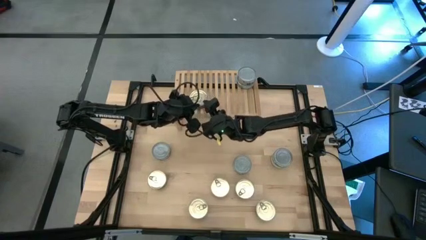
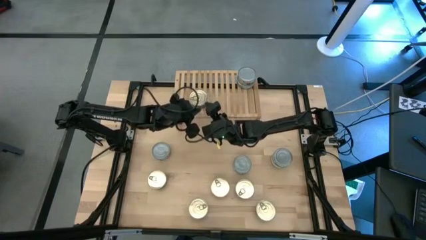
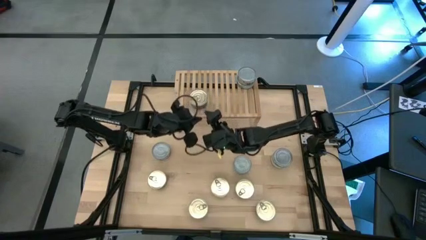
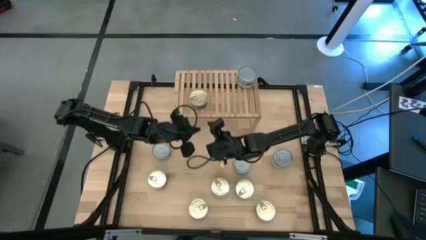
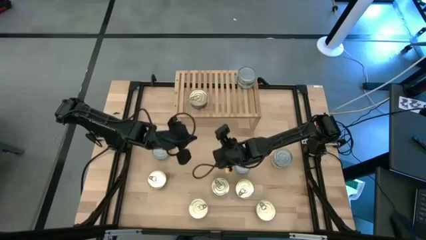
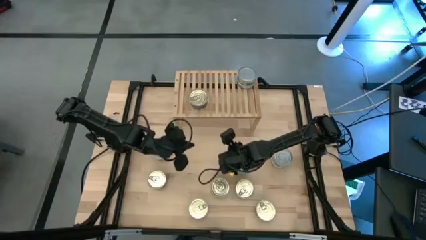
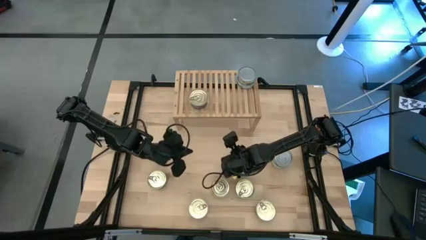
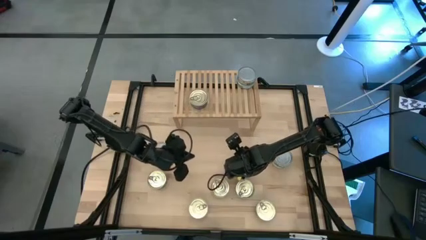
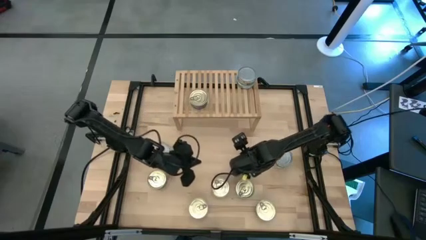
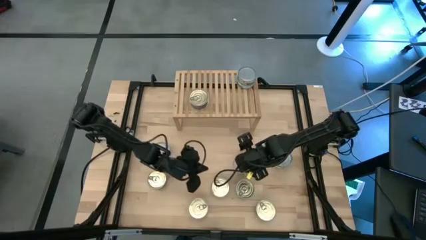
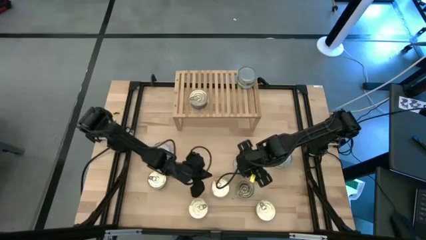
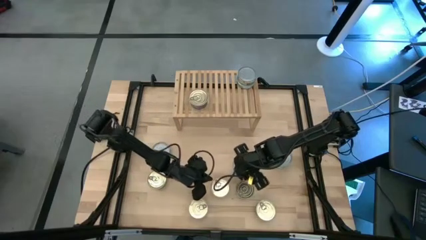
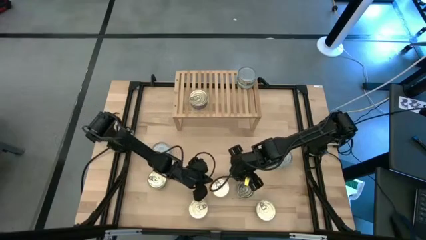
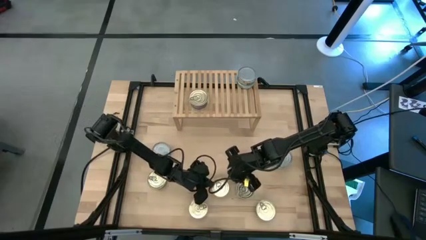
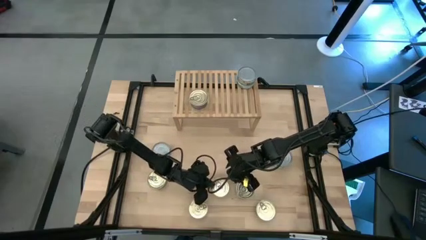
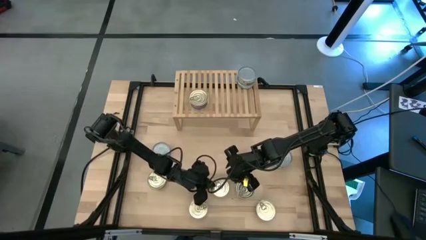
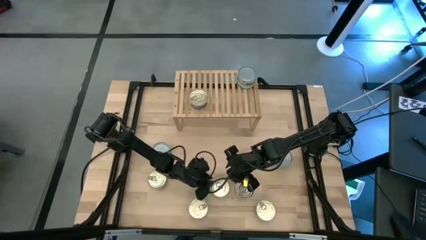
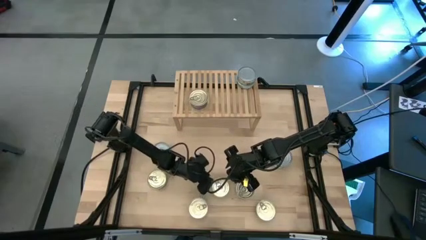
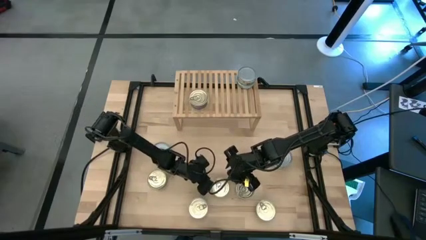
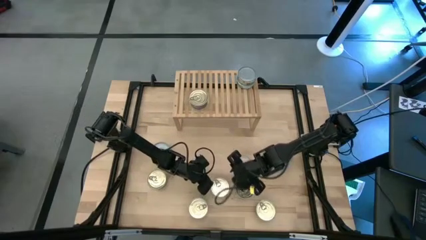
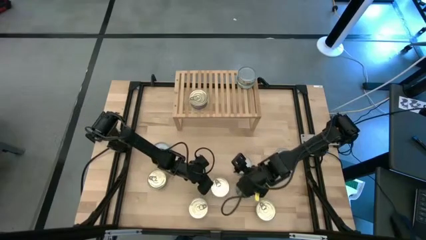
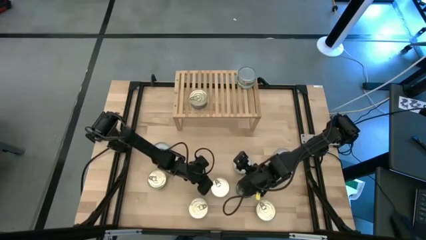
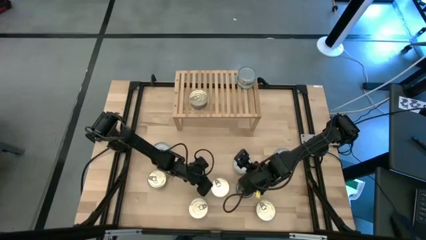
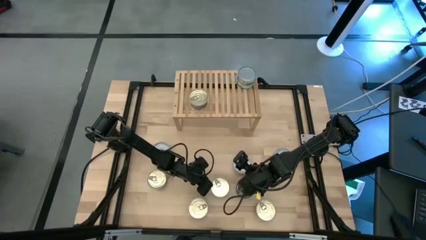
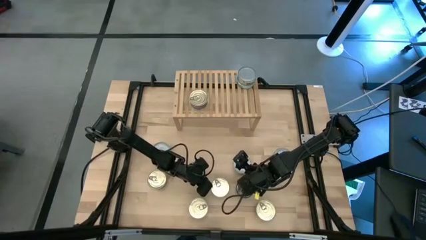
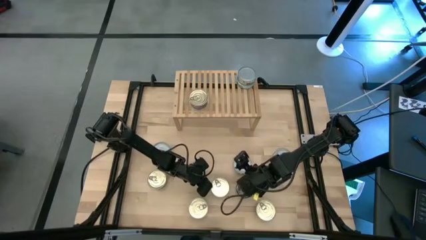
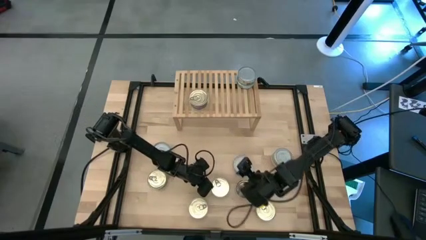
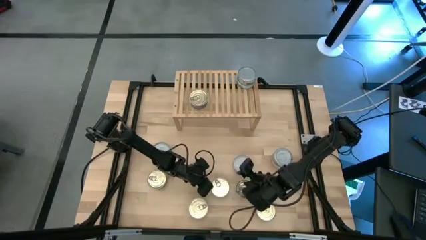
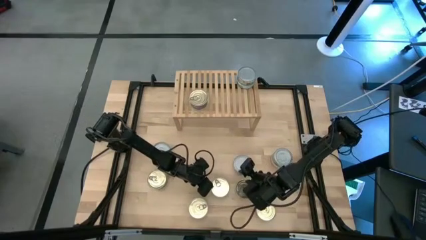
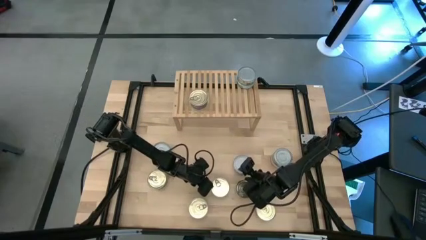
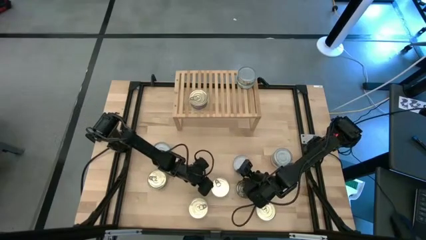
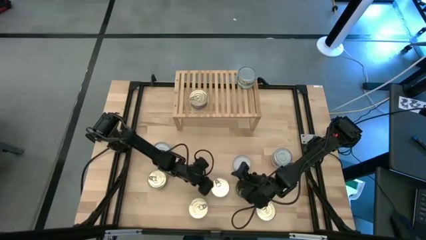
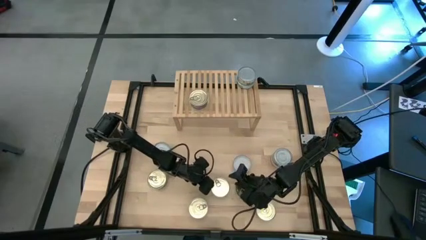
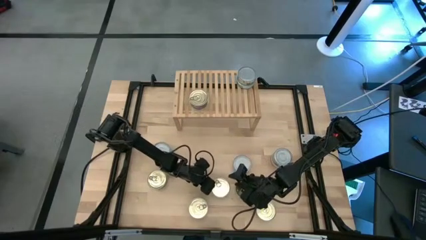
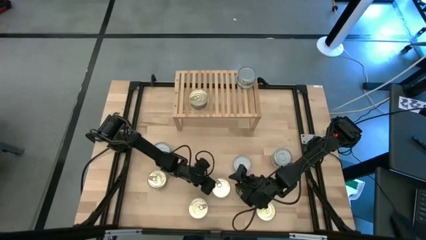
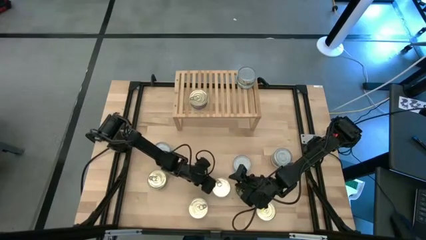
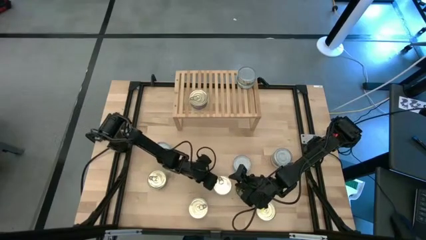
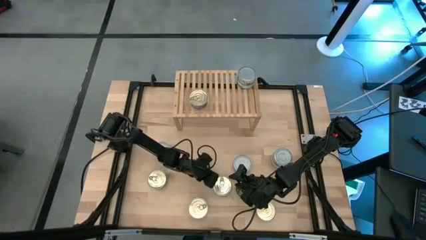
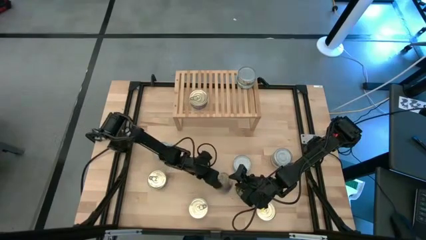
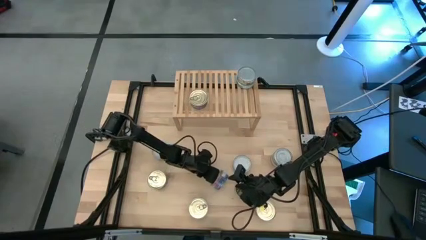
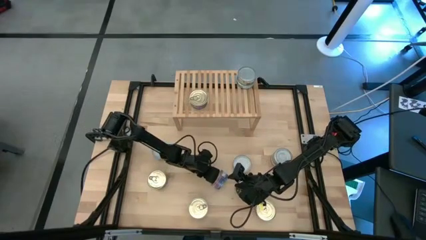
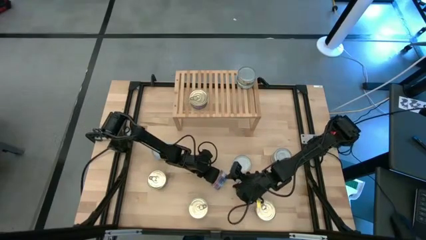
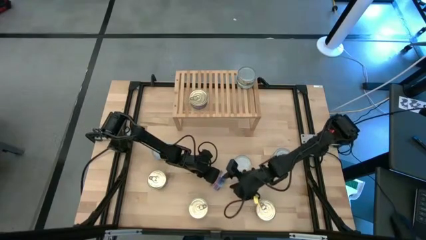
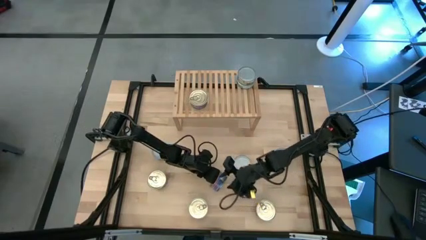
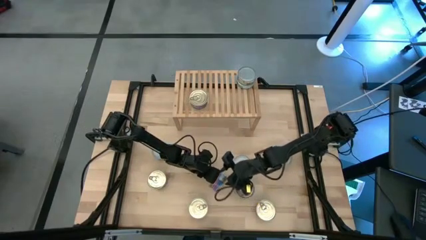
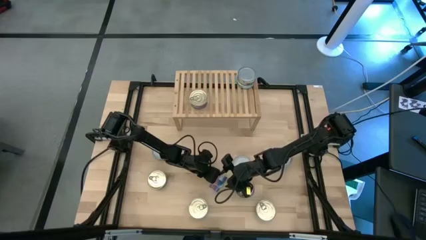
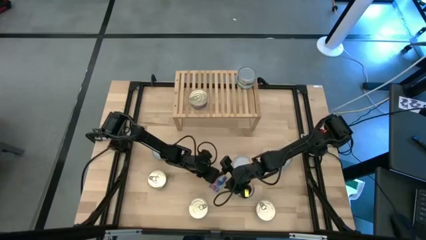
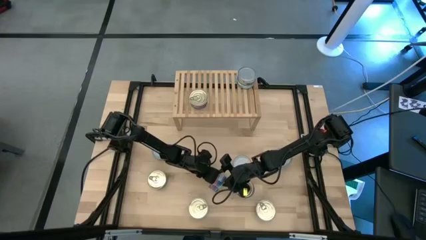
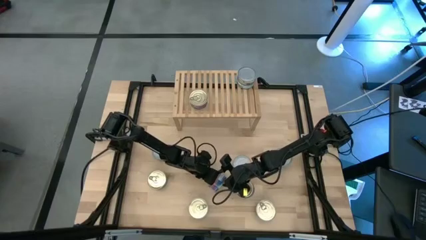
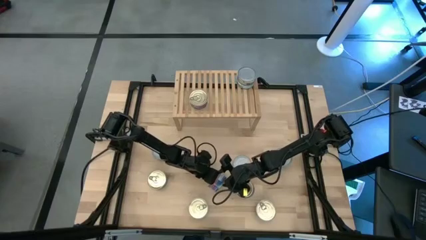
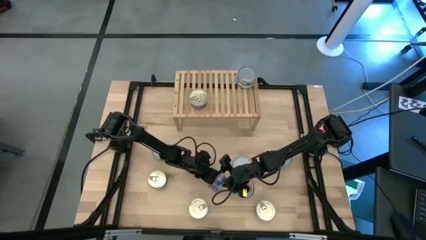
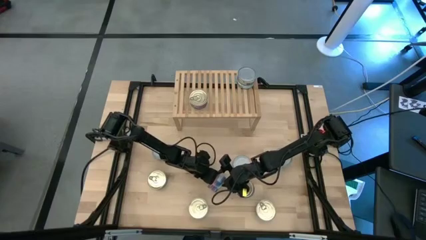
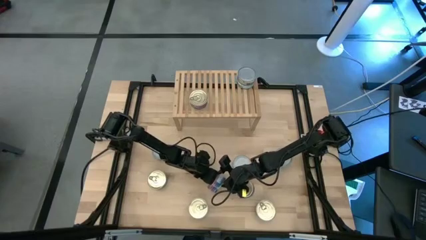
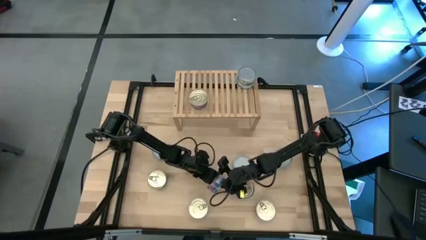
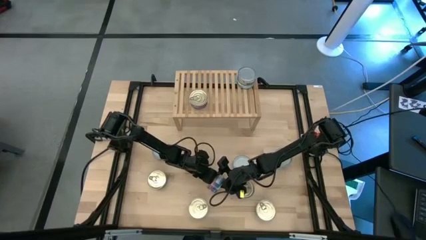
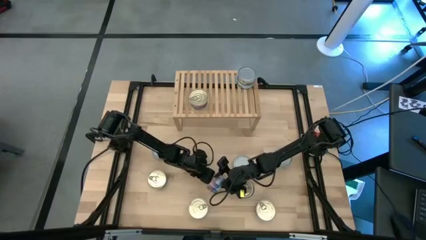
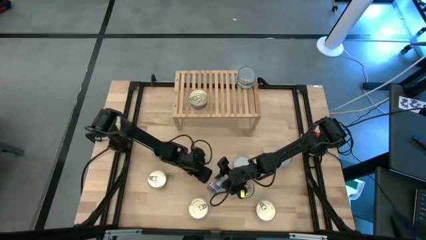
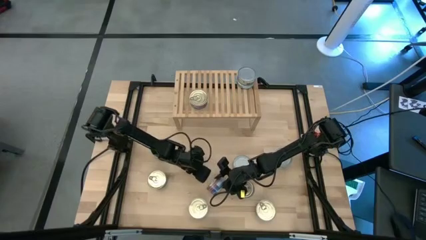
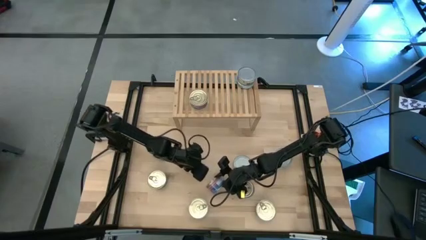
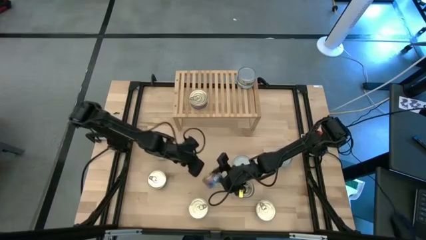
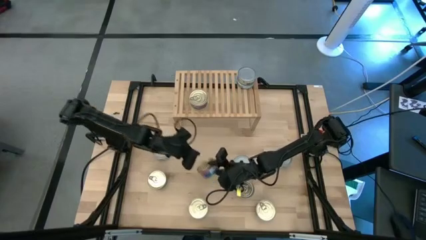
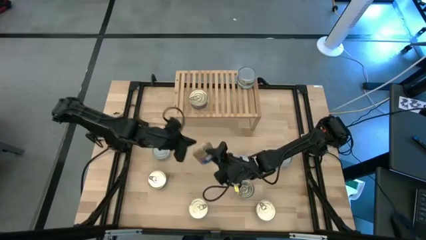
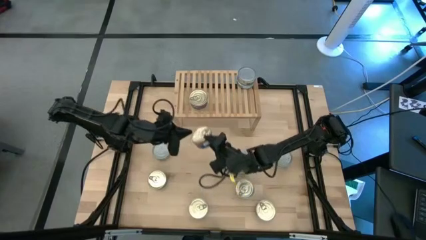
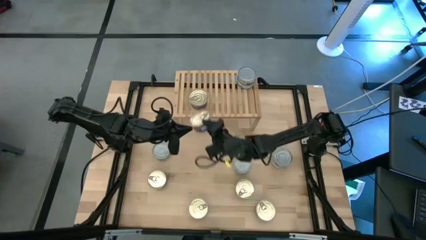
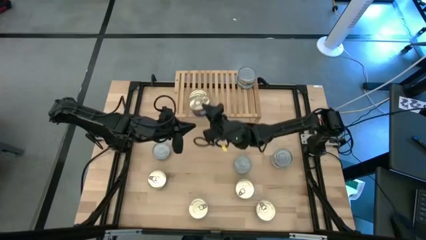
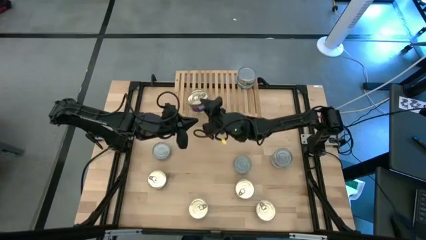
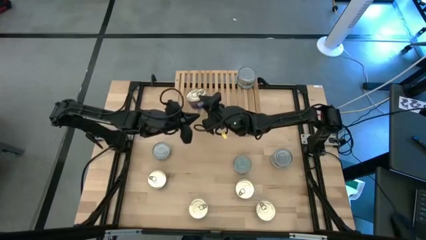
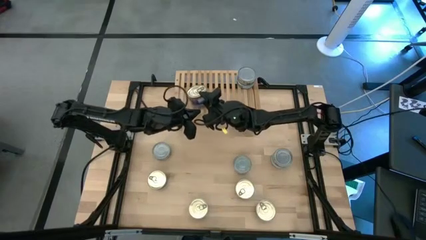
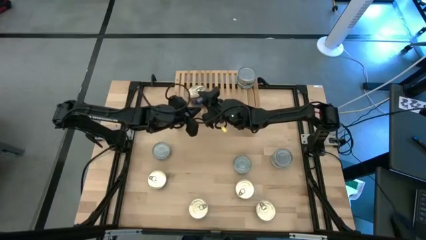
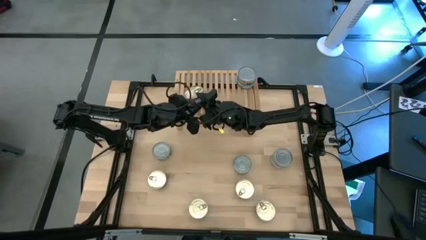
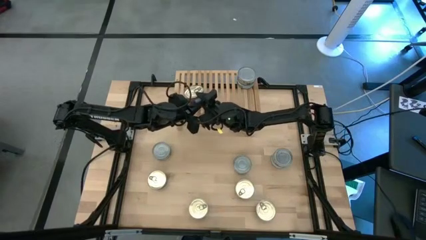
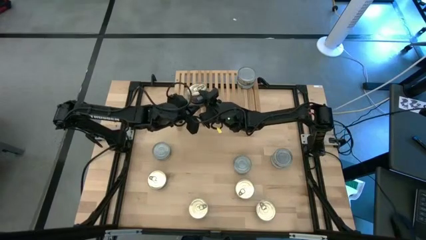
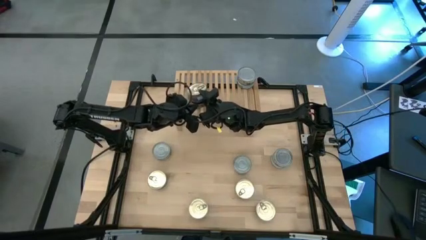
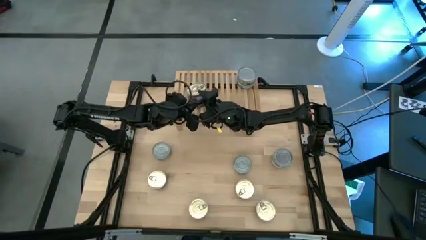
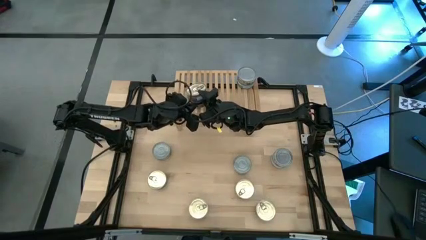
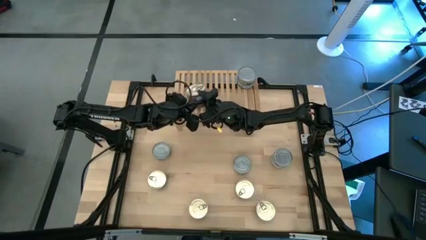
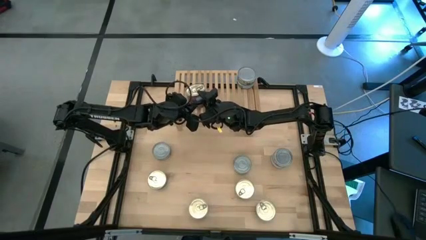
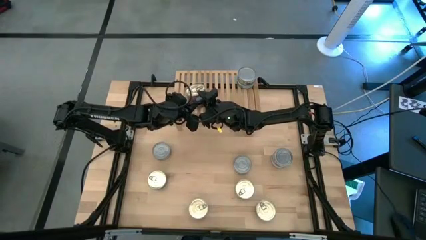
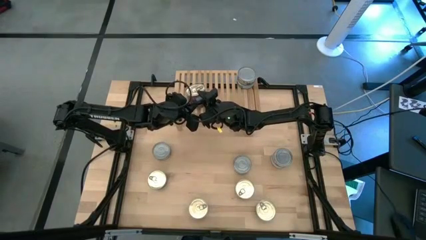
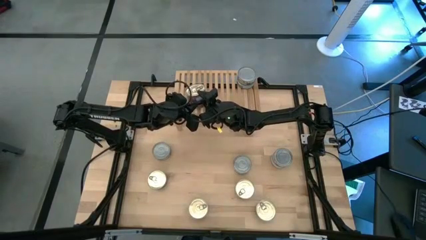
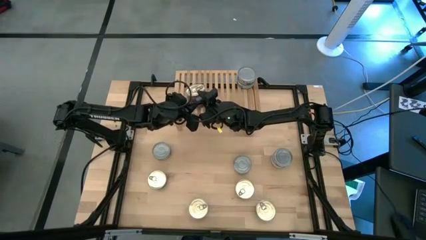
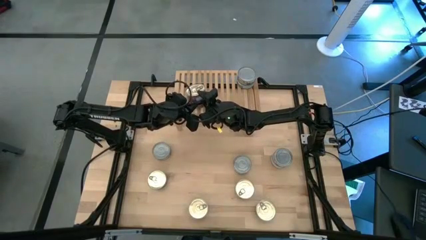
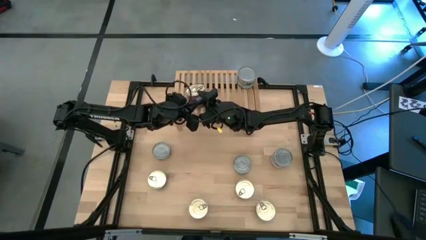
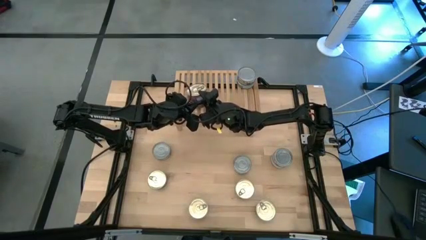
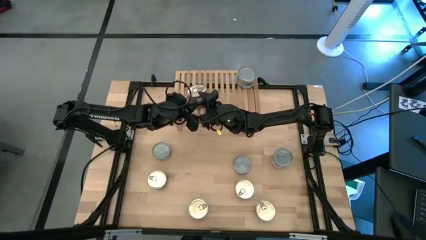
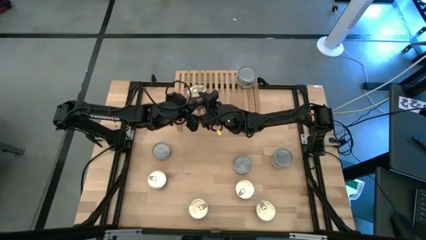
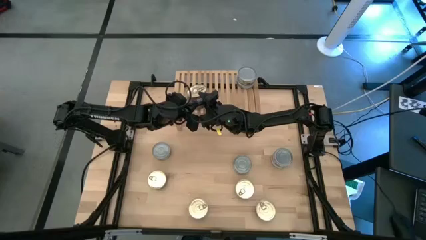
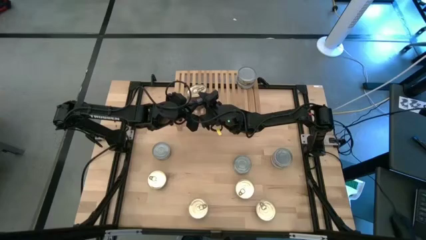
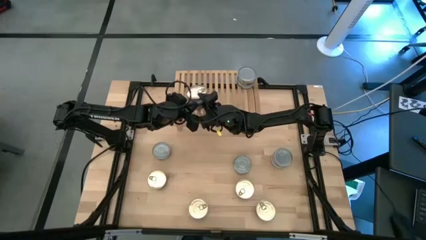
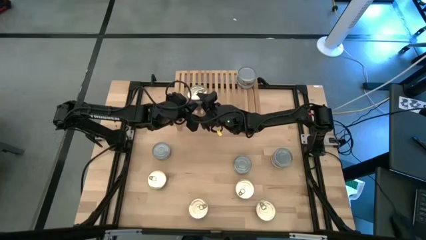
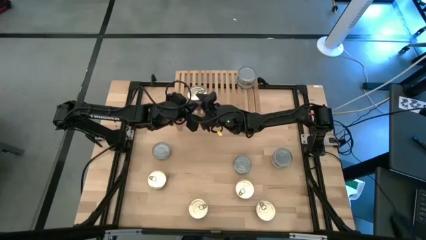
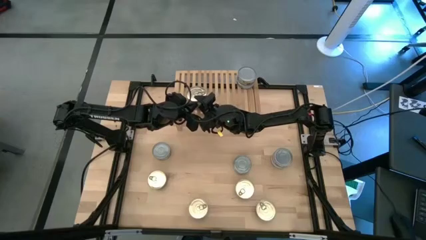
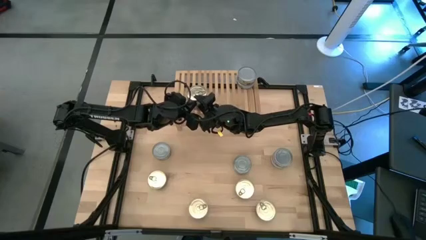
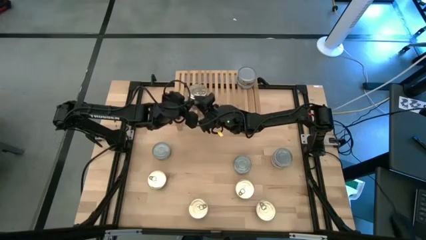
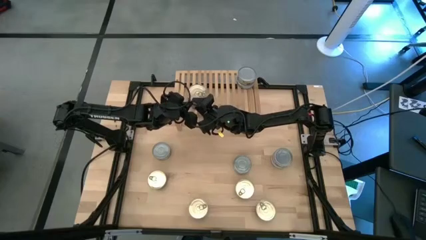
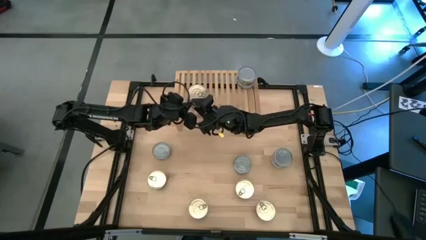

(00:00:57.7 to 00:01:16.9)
Task: Stack canned seafood by type on shelf
Stack the blue tuna can on top of the blue tuna can on the shelf
